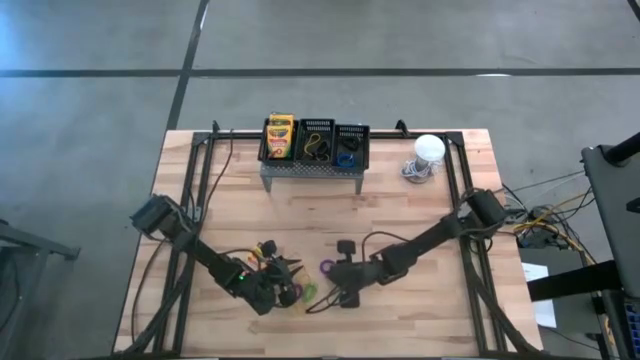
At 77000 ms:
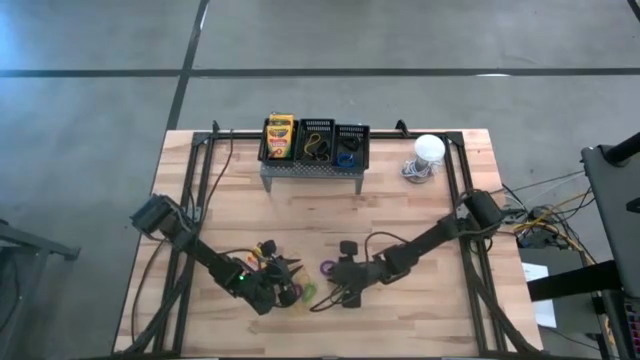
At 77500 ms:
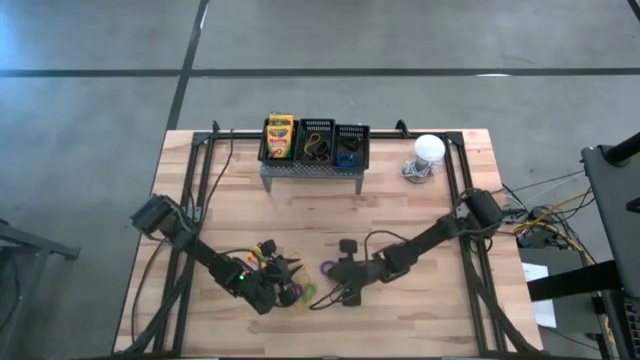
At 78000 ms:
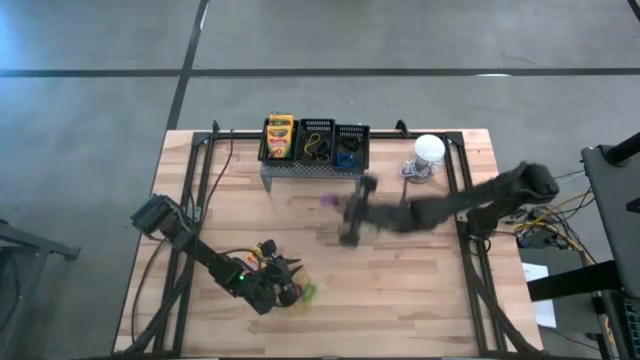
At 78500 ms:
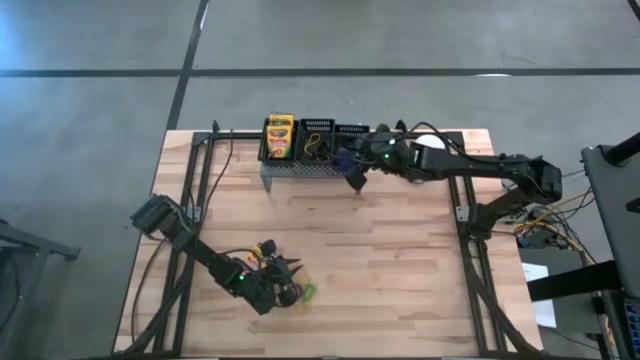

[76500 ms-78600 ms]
Task: Pick & Place Office Desk Supplies
Put the purple spring keychain into the right black bin on the shelf

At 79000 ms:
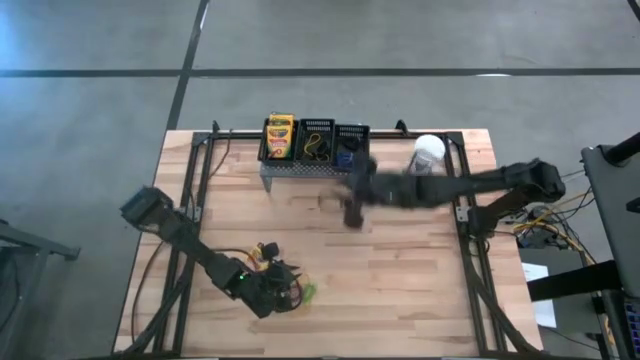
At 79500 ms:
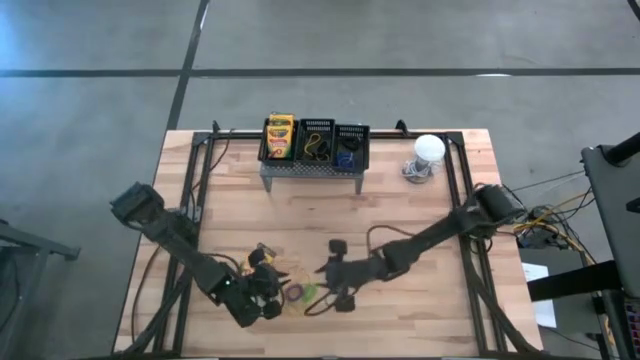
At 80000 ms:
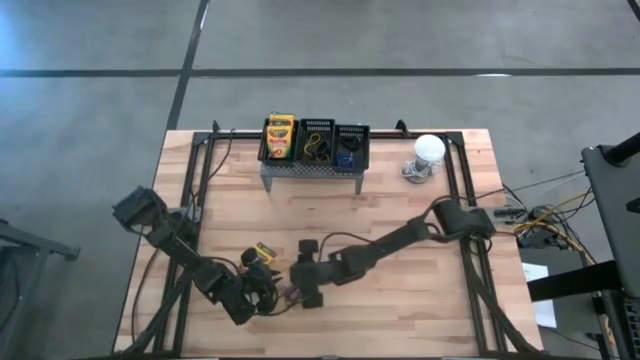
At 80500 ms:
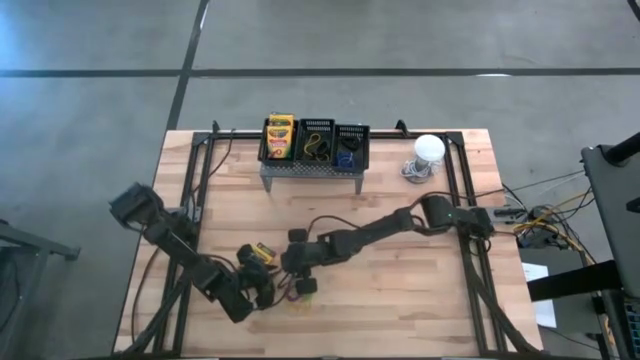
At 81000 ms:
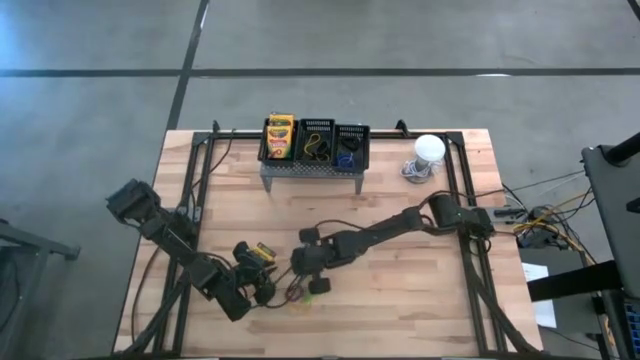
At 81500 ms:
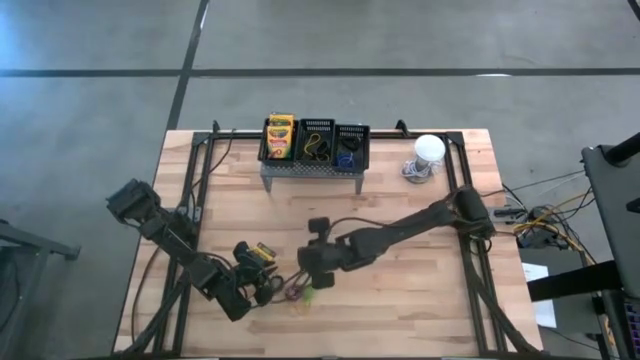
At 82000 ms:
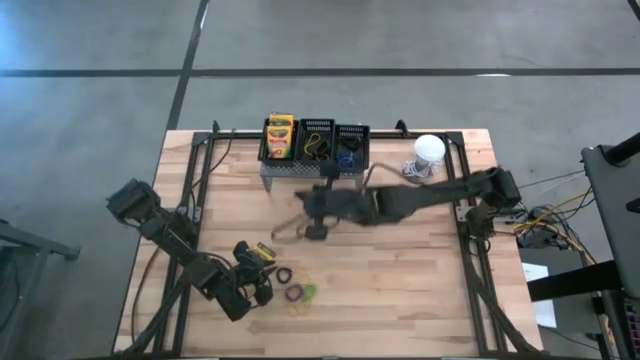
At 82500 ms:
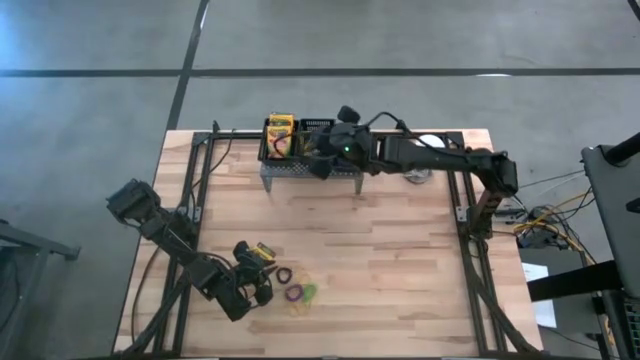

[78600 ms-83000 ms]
Put the yellow rubber band into the middle black bin on the shelf

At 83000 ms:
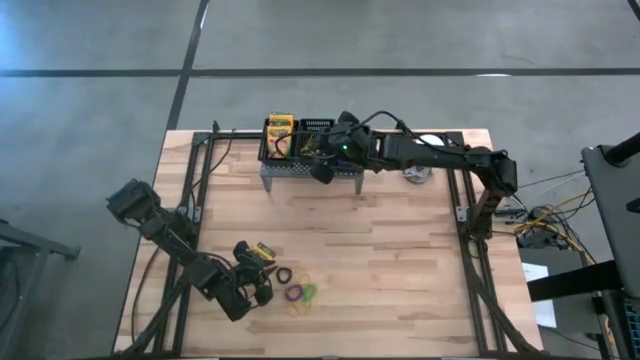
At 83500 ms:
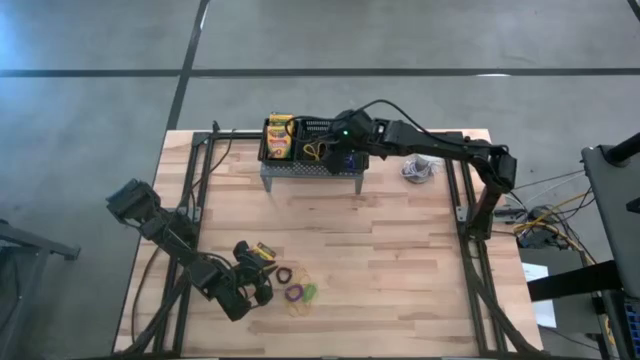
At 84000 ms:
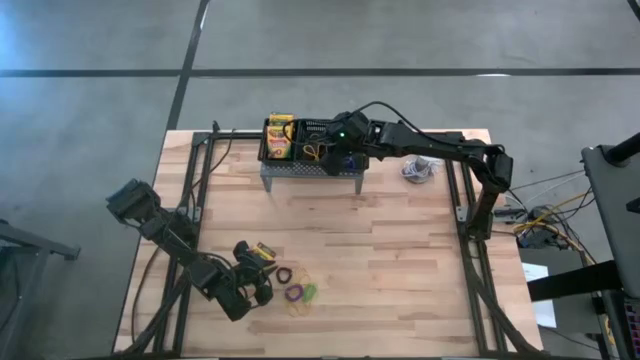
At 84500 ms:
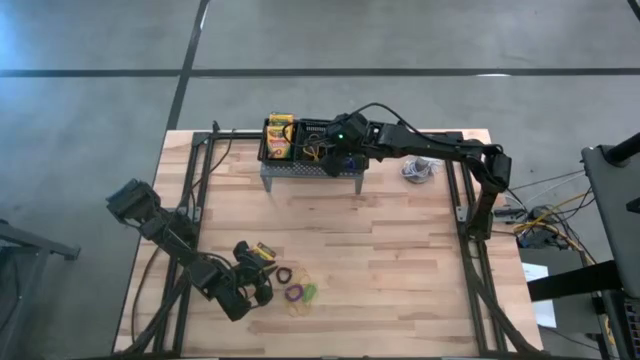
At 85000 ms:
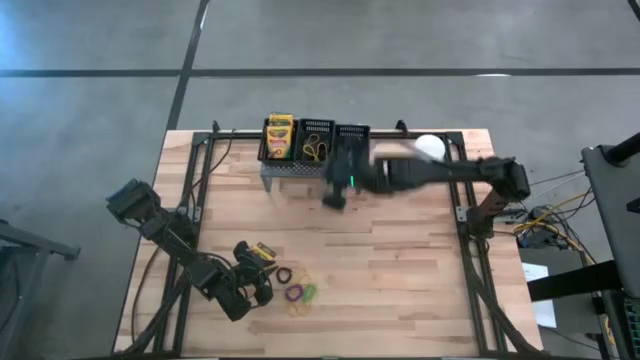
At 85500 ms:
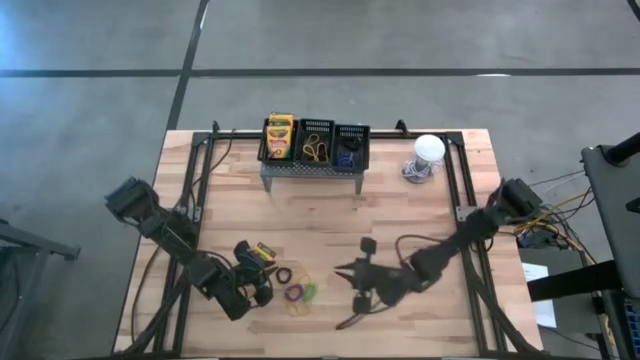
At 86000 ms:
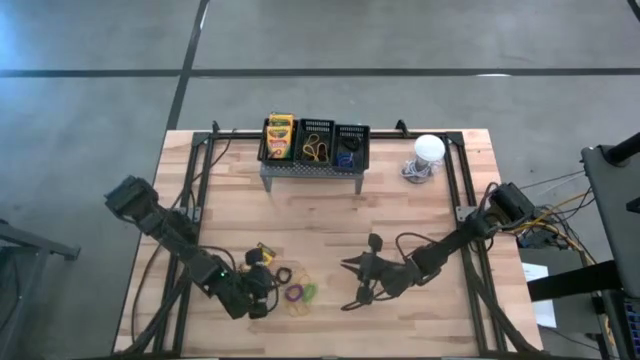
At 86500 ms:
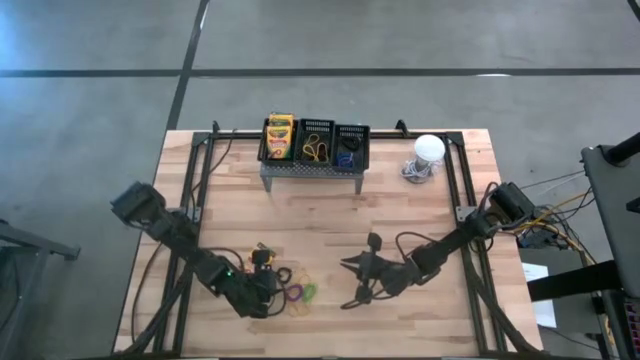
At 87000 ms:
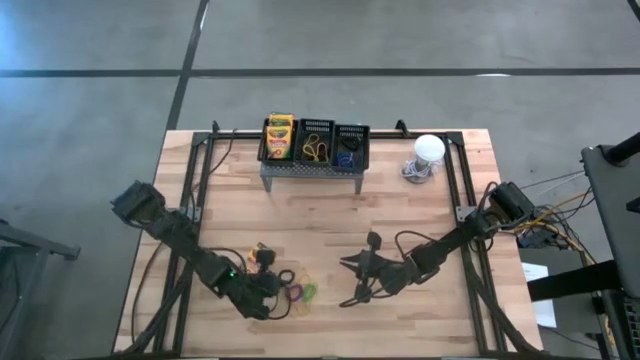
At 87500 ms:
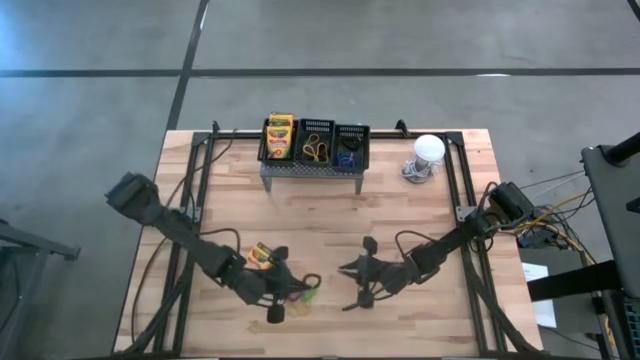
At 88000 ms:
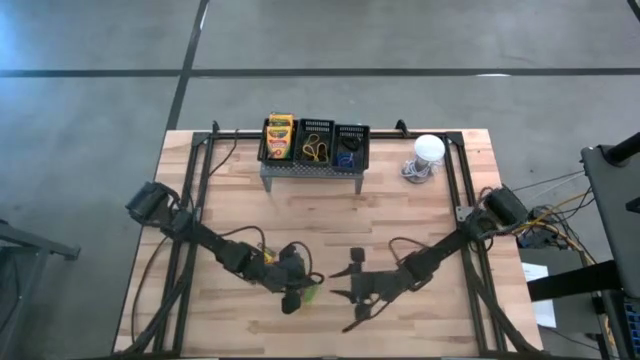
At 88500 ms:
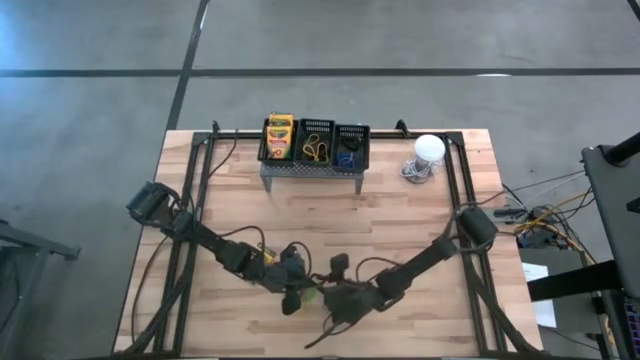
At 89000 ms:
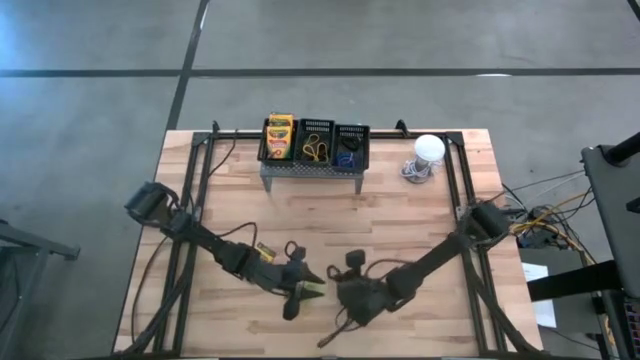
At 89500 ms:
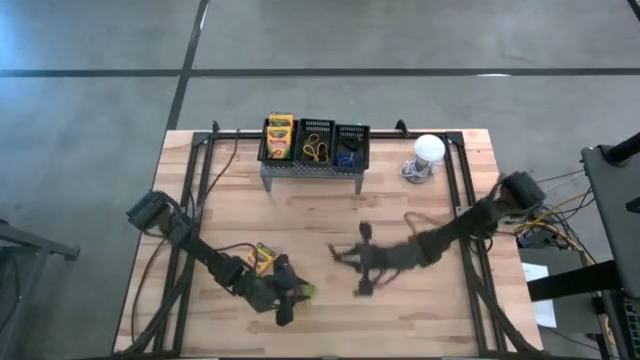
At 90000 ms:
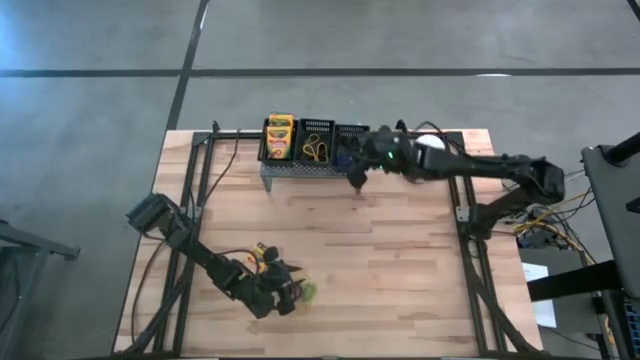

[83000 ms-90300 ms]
Put the black spring keychain into the right black bin on the shelf

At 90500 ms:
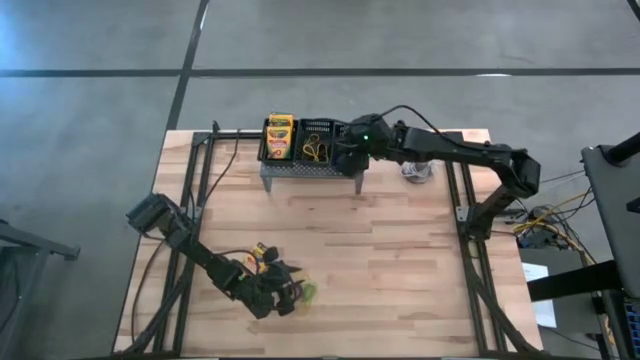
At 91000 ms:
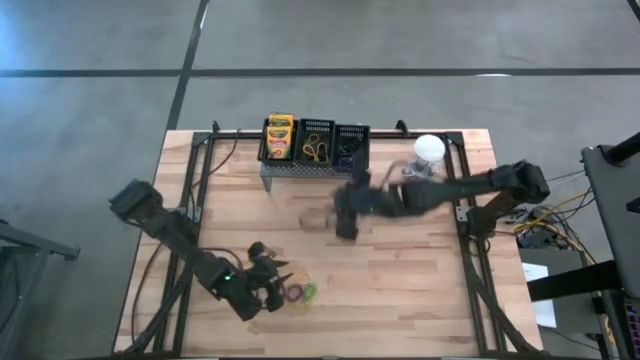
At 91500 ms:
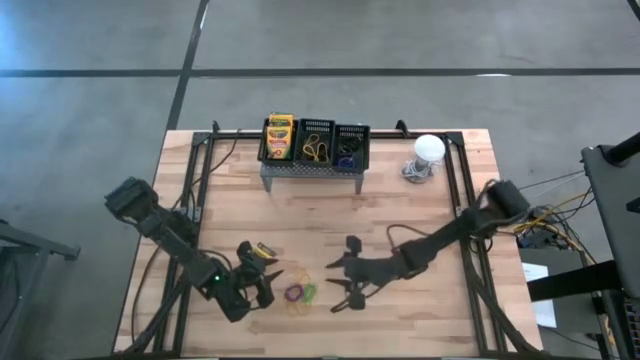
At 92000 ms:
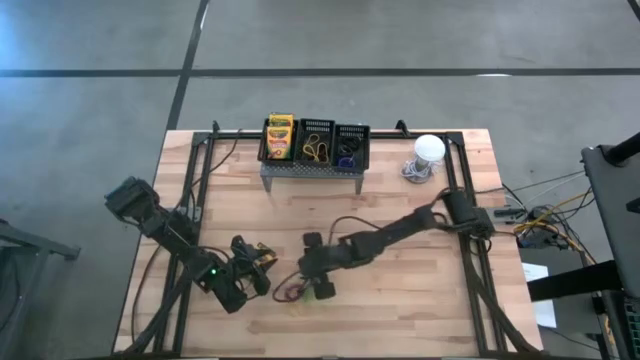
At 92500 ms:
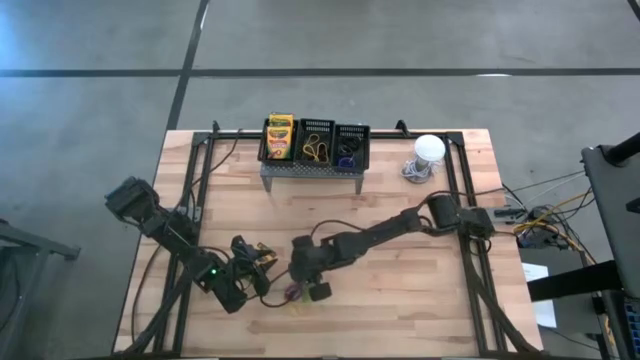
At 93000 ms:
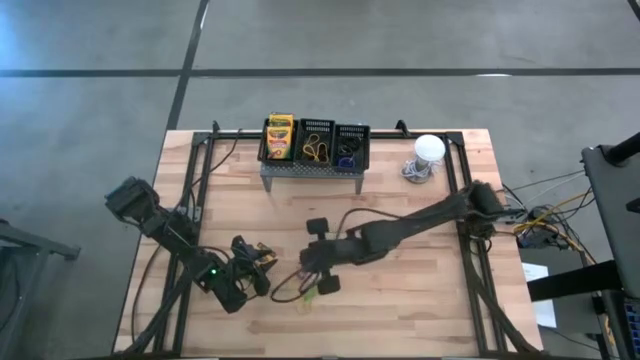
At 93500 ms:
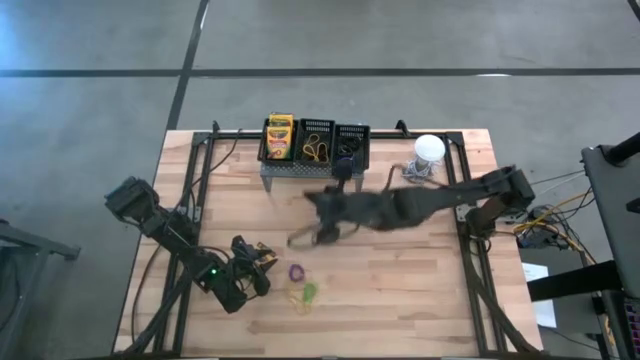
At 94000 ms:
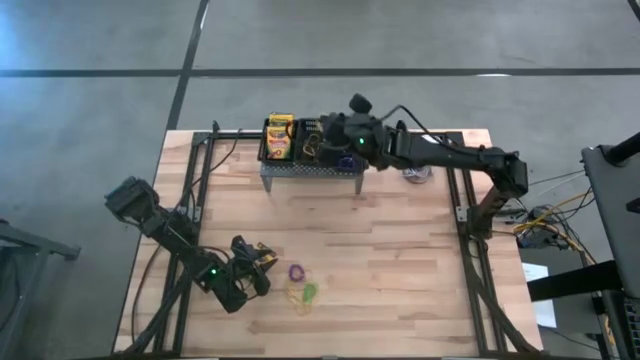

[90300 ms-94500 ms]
Put the yellow rubber band into the middle black bin on the shelf

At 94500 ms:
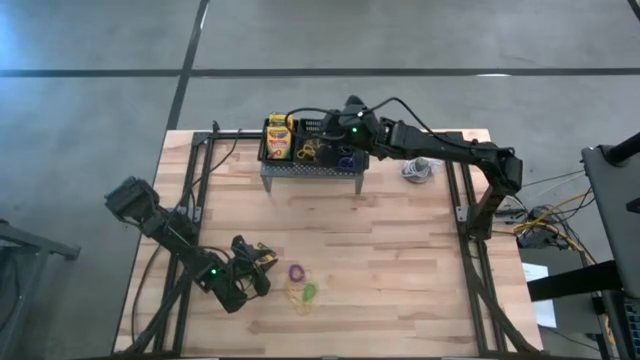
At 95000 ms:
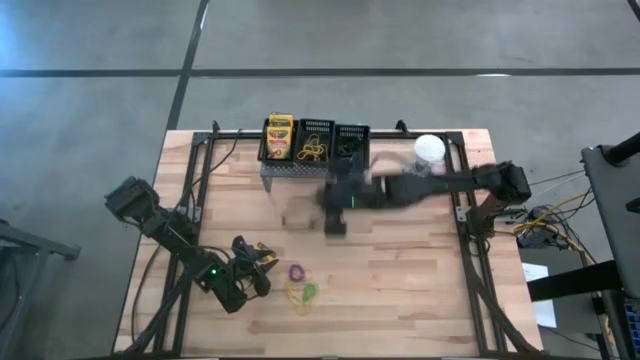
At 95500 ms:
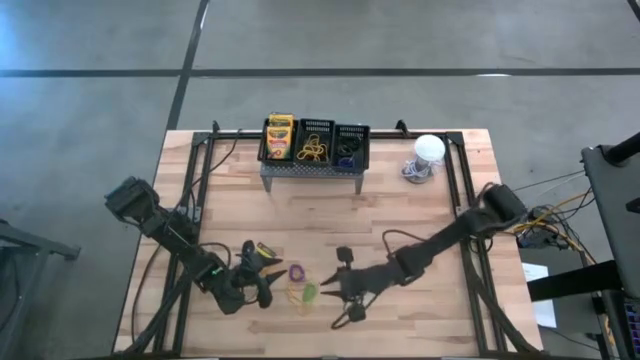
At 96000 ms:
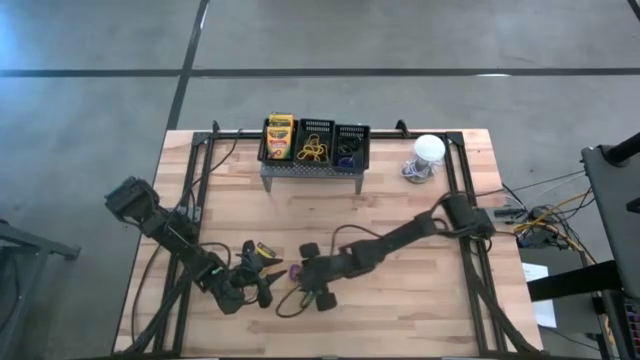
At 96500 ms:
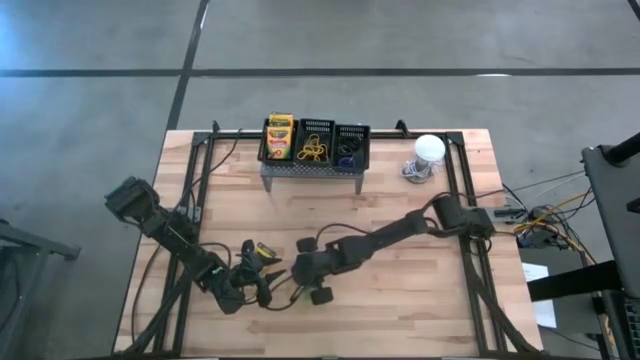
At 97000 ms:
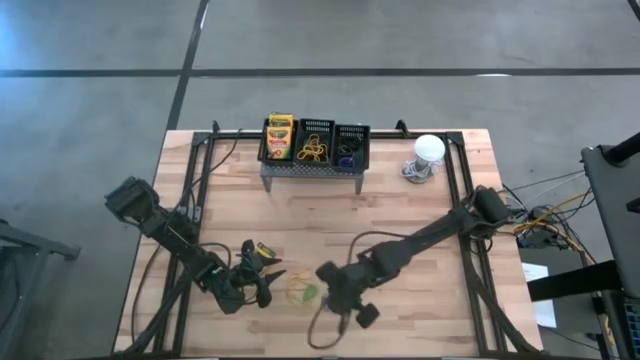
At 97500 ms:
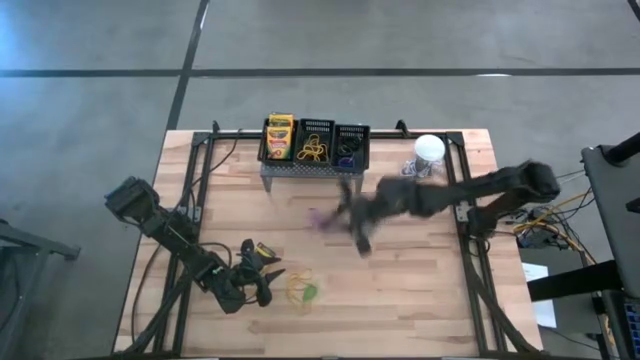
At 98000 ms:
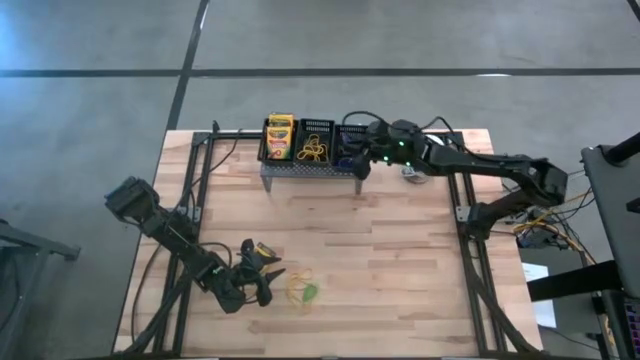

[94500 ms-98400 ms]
Put the purple spring keychain into the right black bin on the shelf

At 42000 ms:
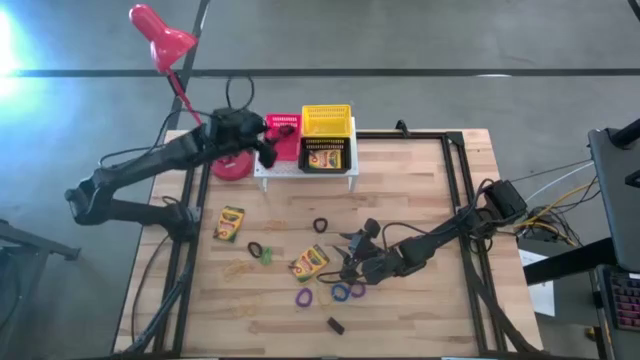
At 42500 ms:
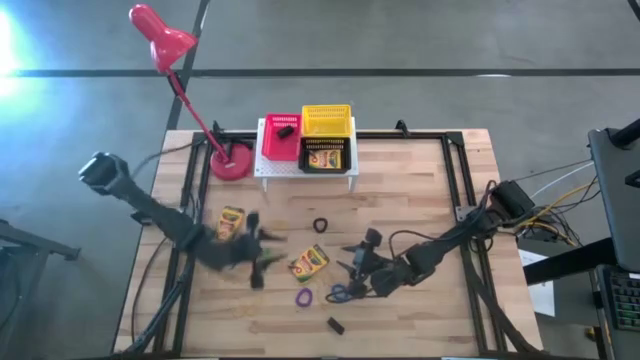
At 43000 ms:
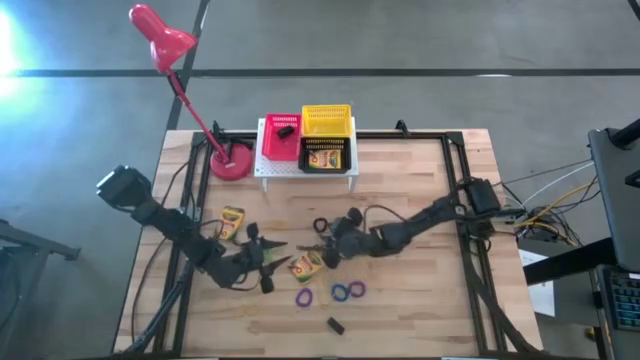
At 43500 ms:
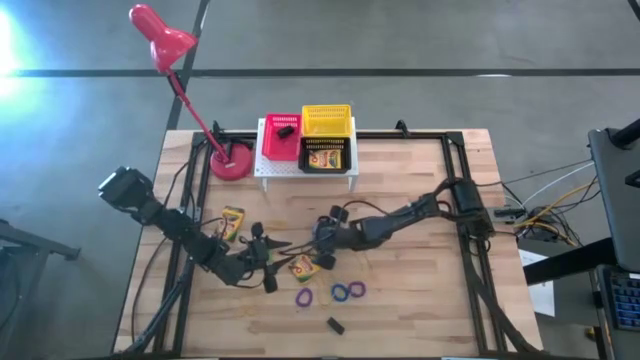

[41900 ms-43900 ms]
Task: Pick & Place Office Desk Supplies
Put the right black spring keychain into the yellow bin on the shelf
